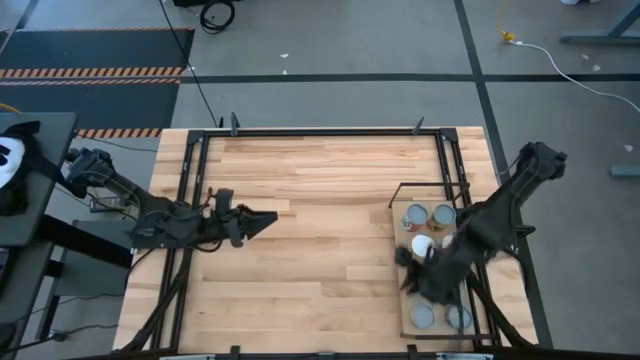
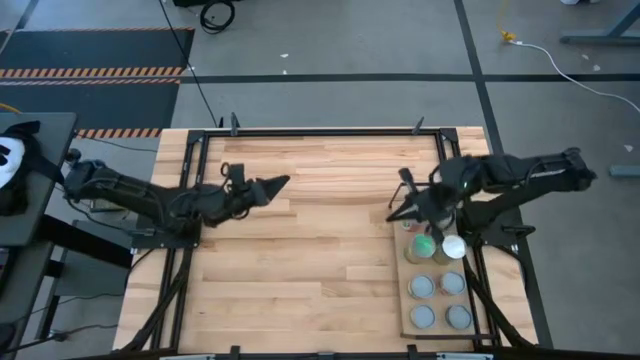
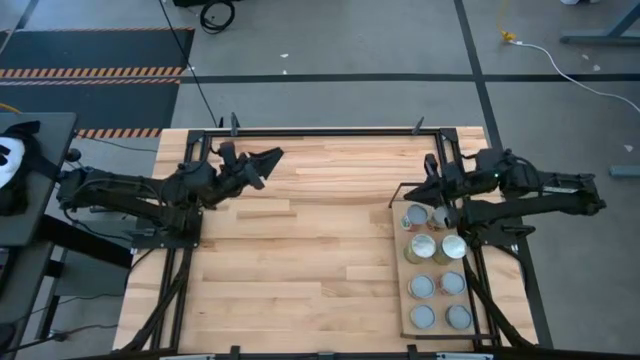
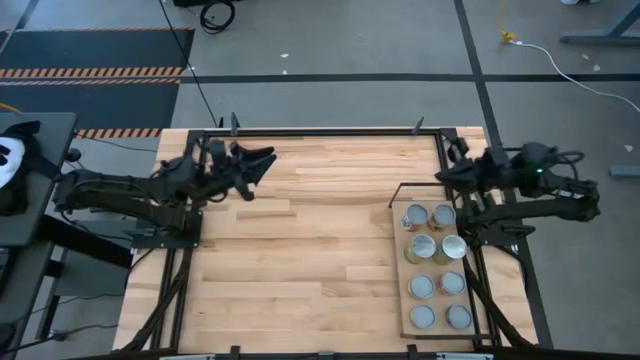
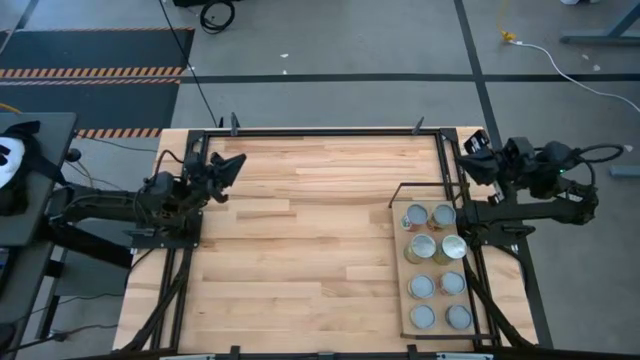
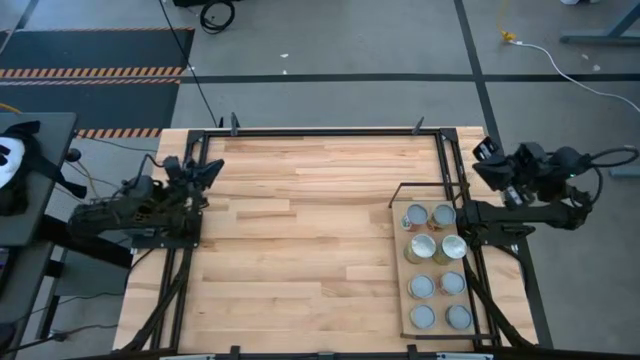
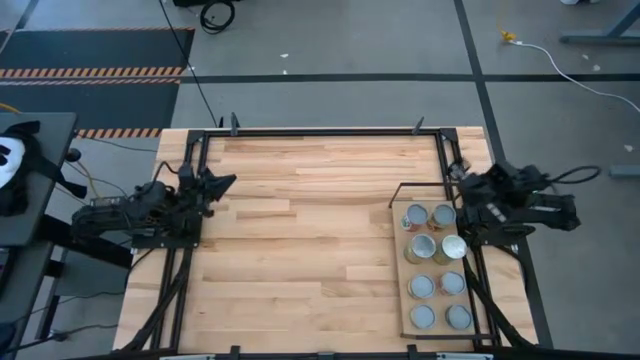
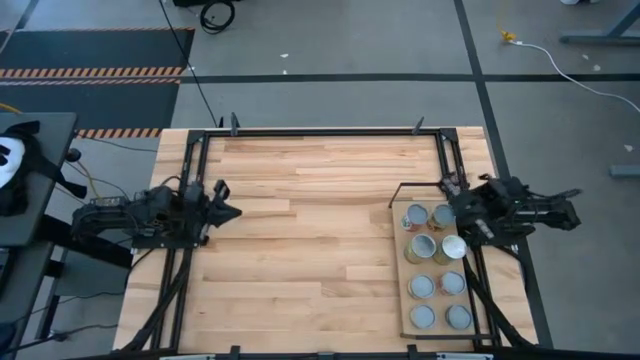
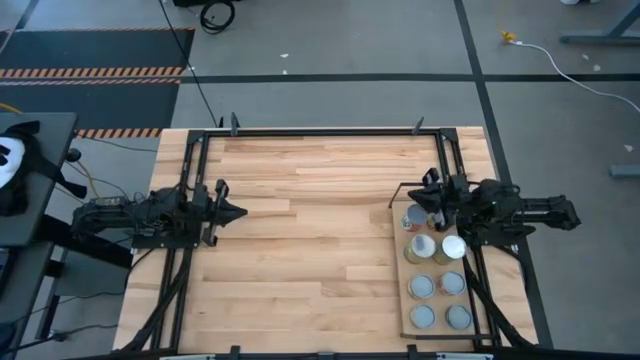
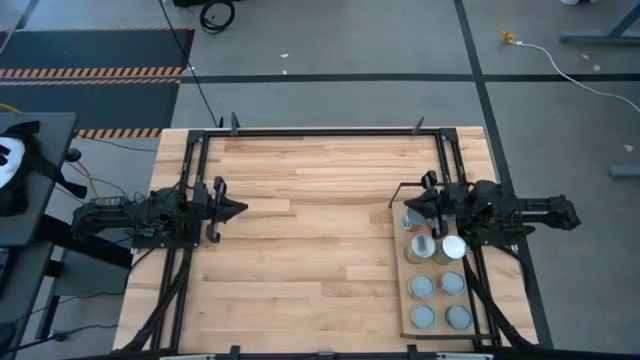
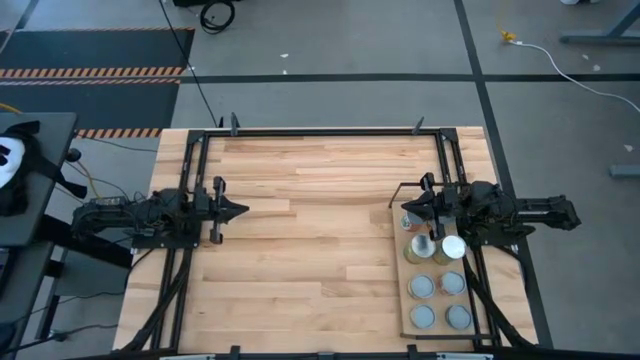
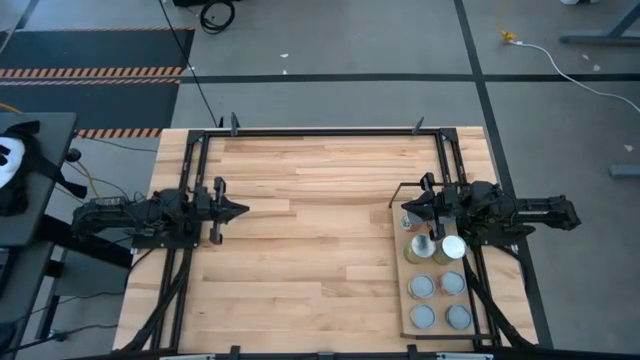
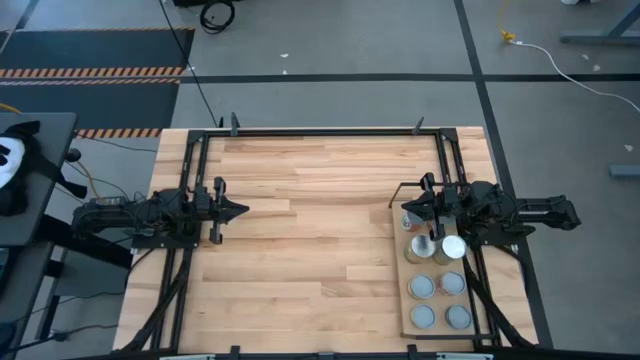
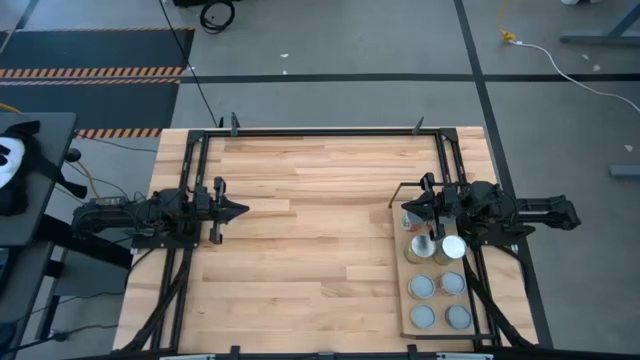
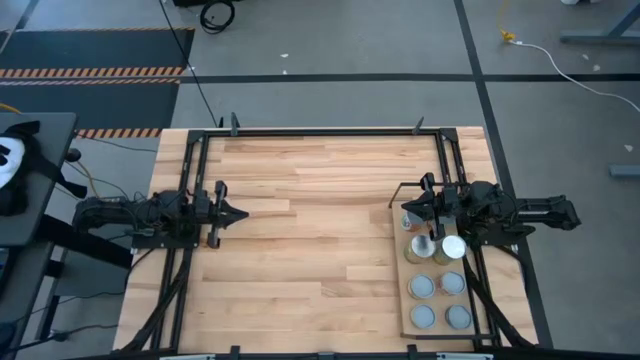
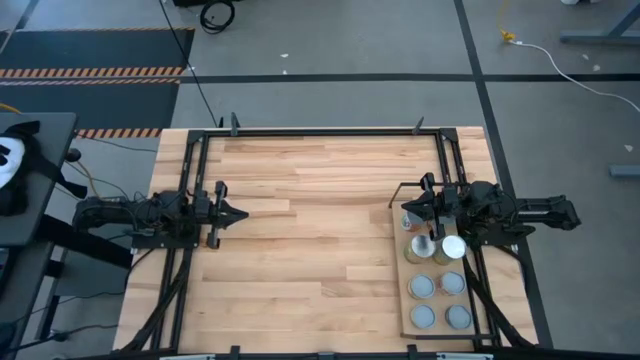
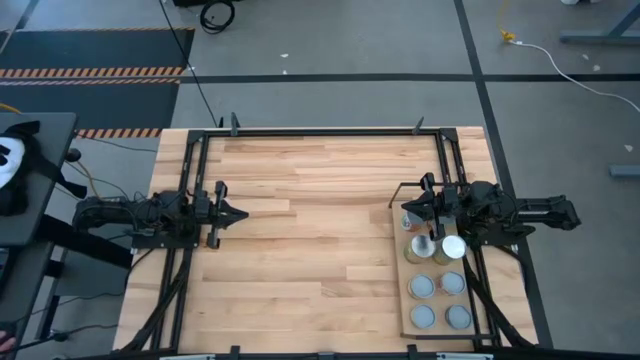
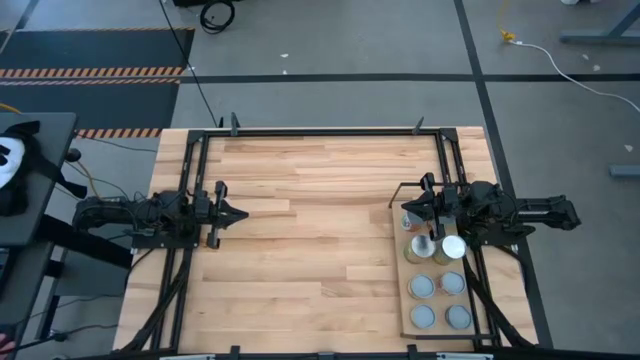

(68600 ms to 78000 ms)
Task: Pick and place cans onto a shelf
Return to Home Position

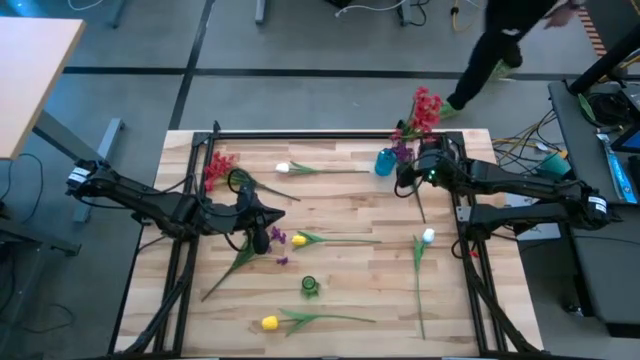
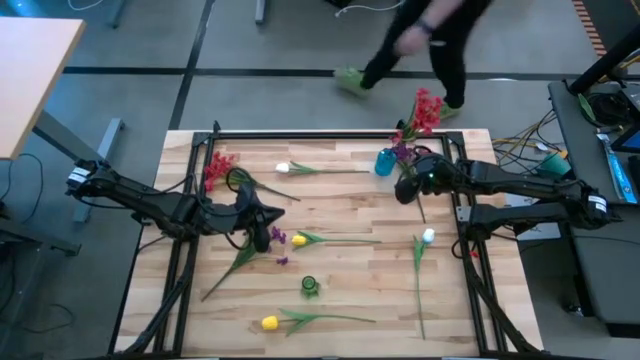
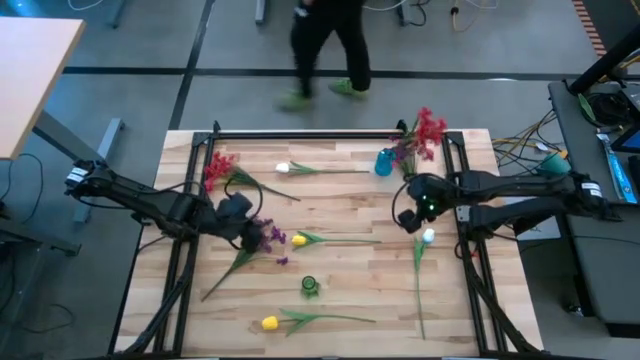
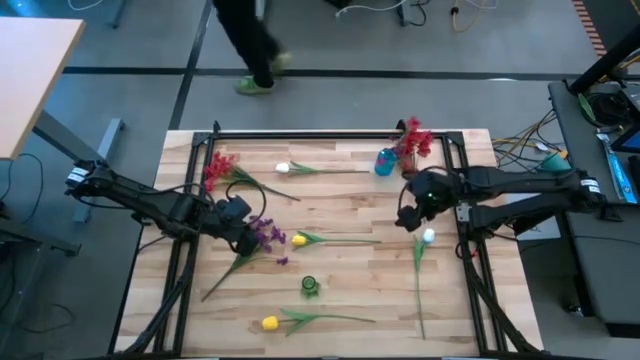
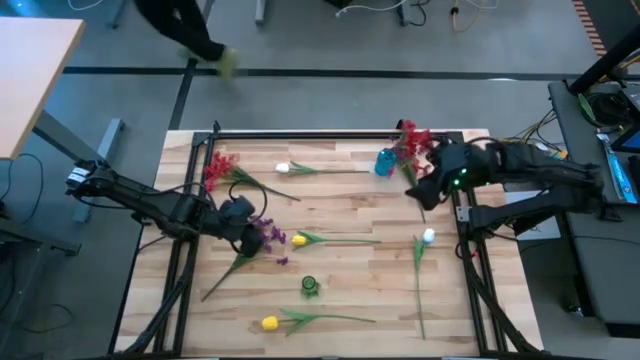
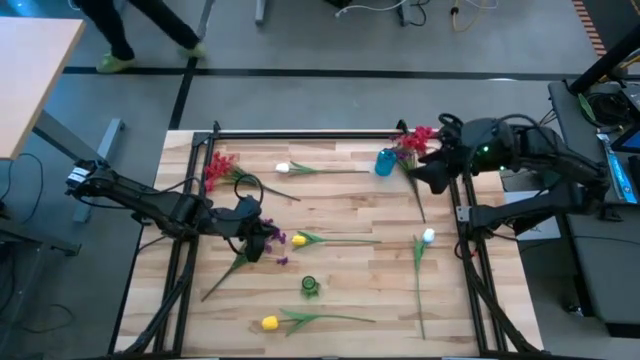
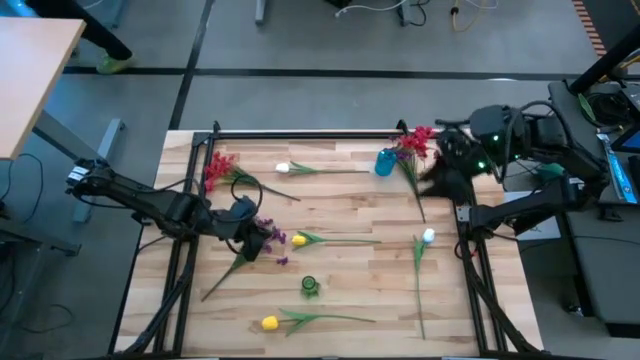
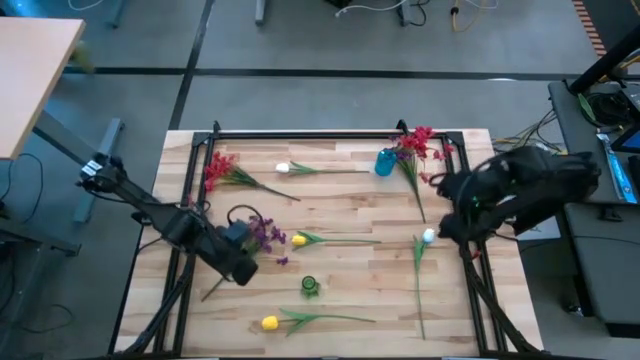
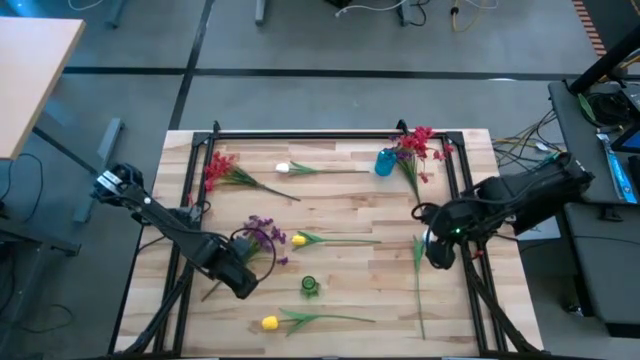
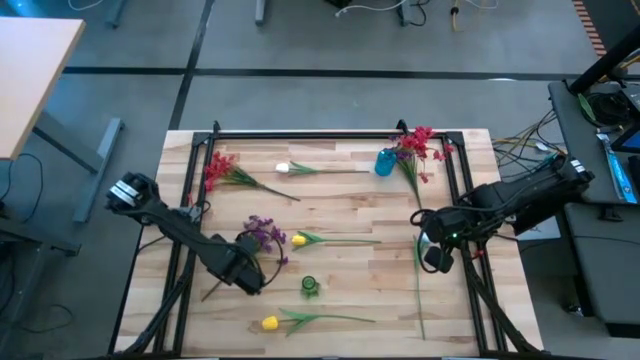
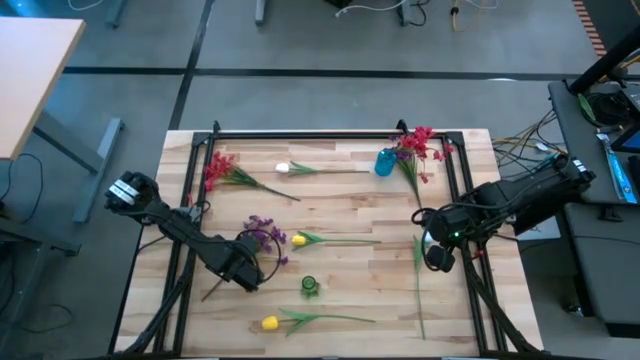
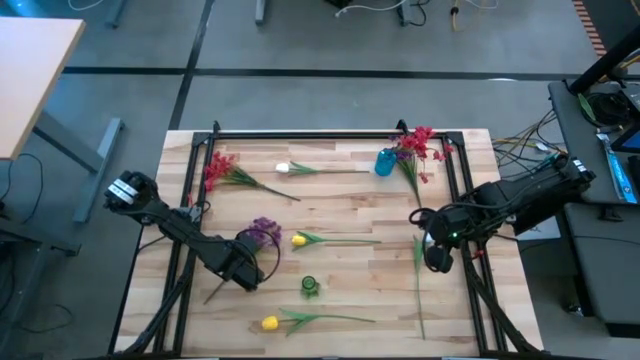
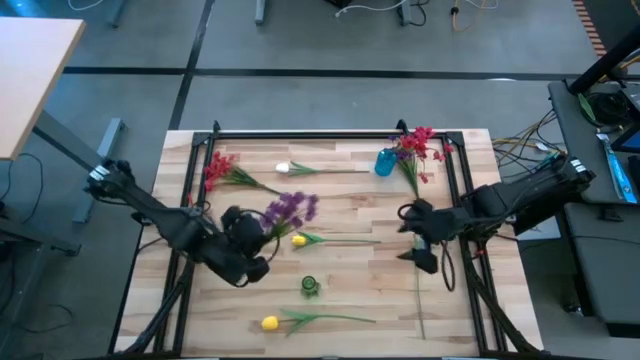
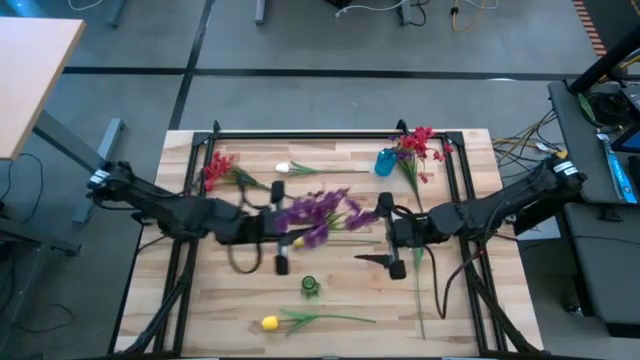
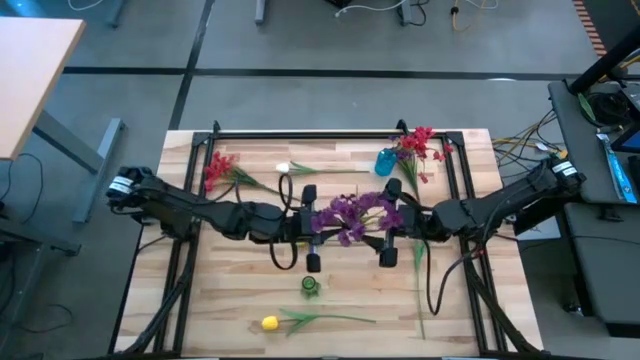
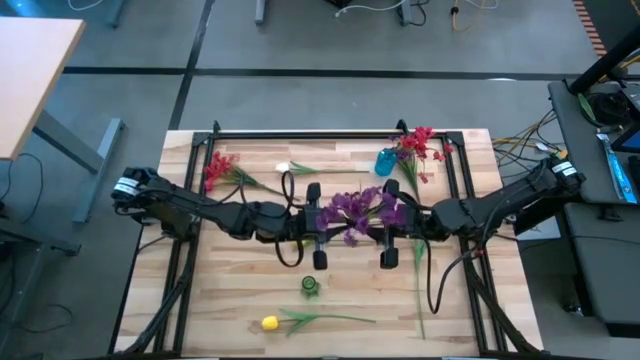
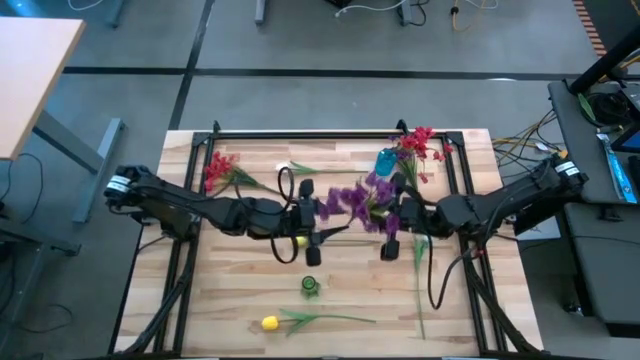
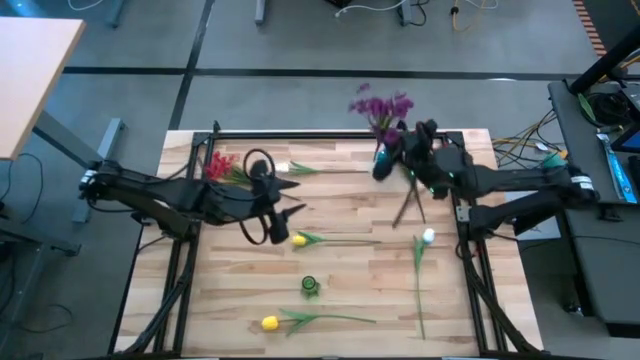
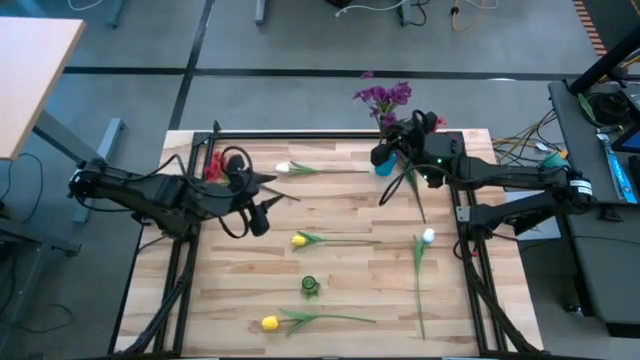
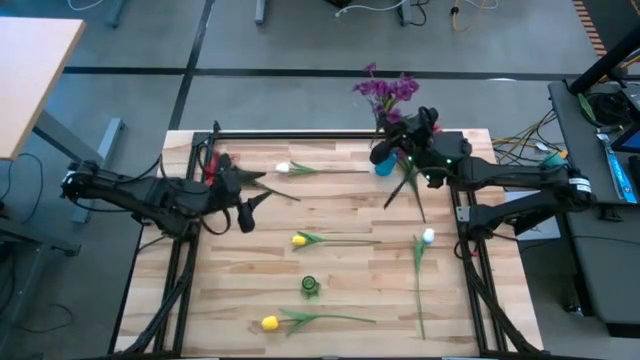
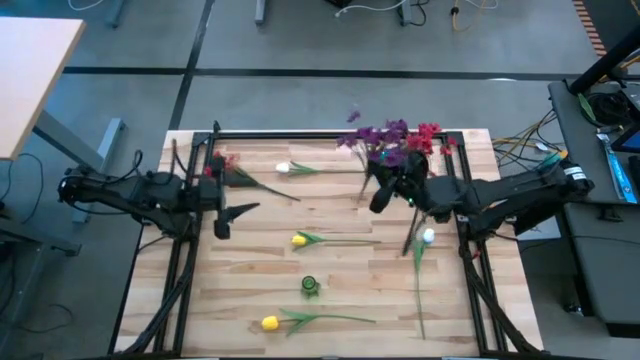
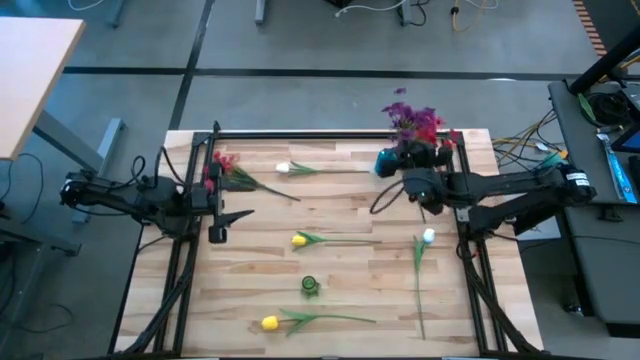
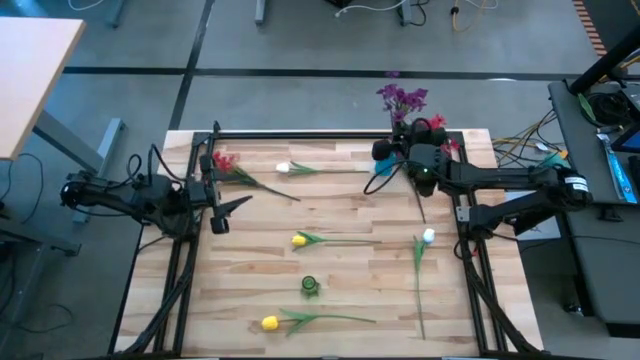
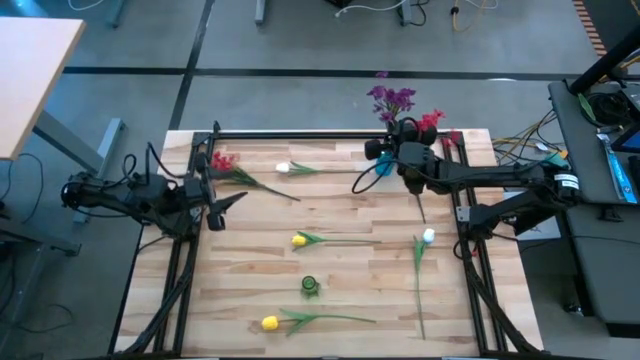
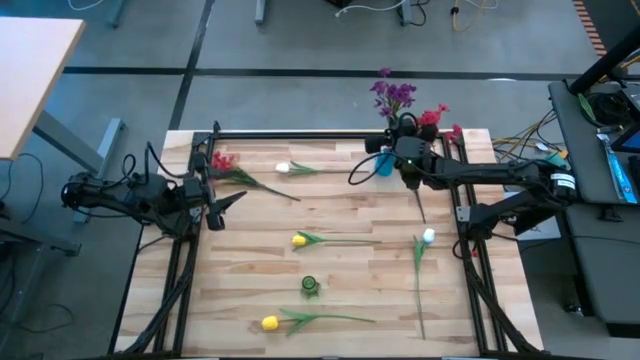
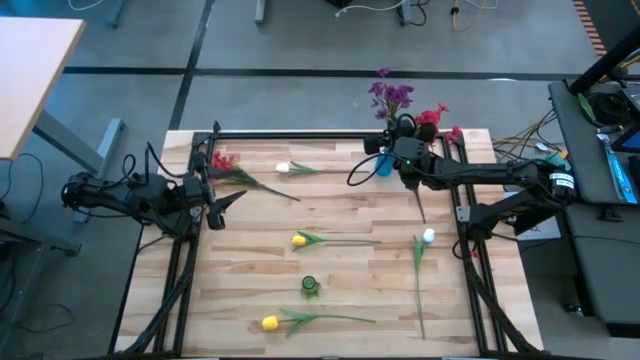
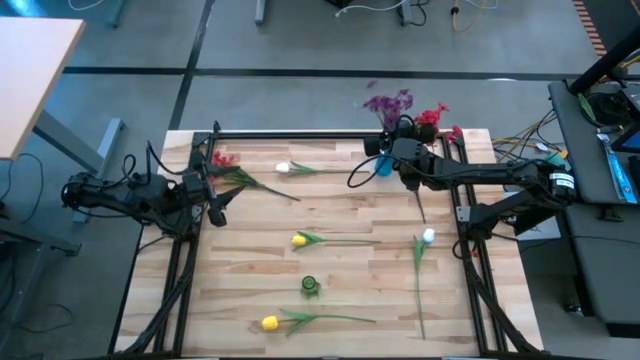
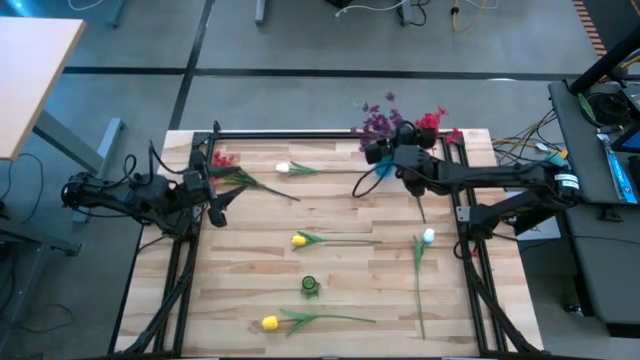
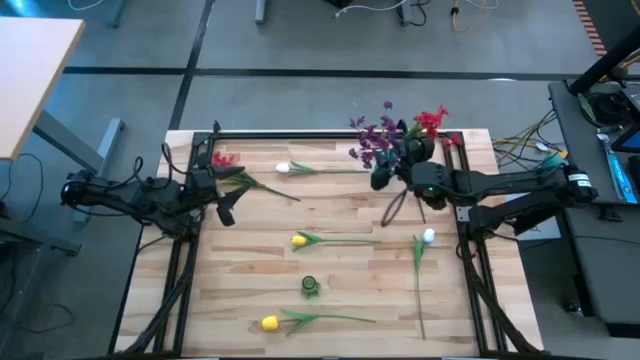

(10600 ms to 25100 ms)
Task: Sort flowers into vase by color
Put the bottom purple flowers into the blue vase
